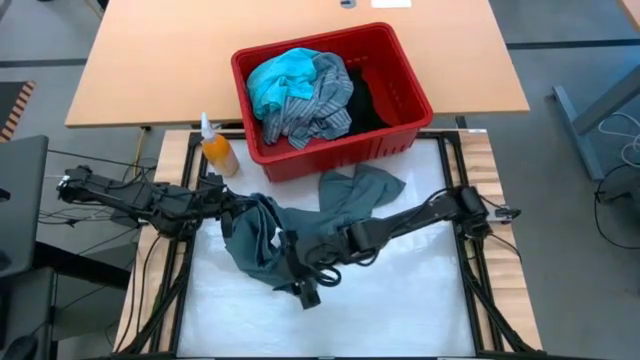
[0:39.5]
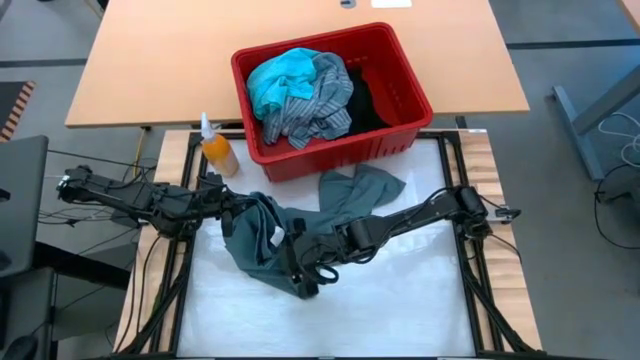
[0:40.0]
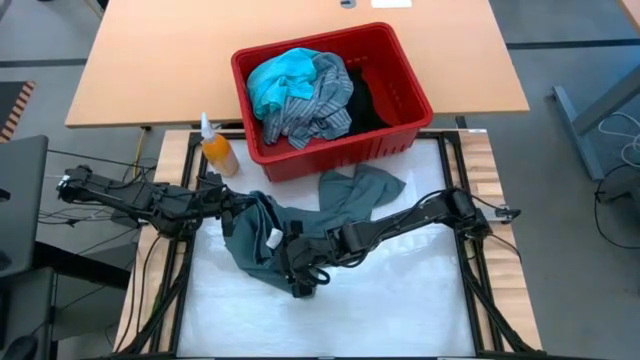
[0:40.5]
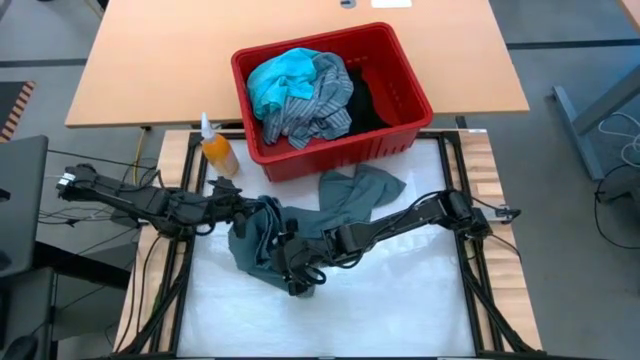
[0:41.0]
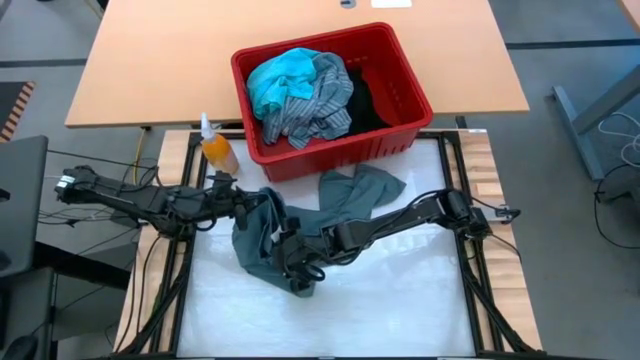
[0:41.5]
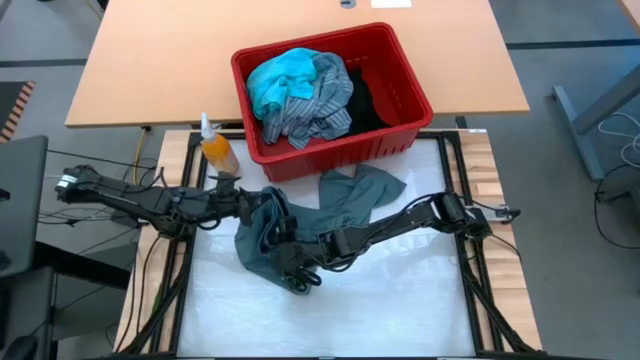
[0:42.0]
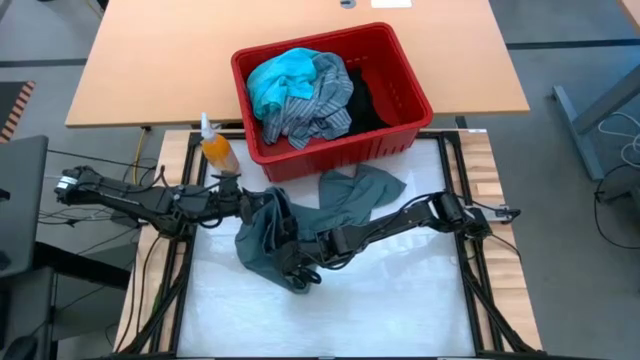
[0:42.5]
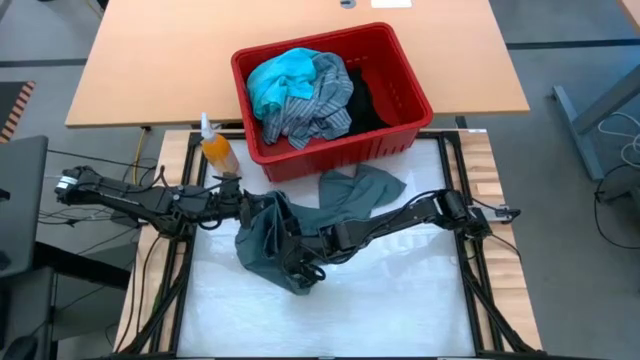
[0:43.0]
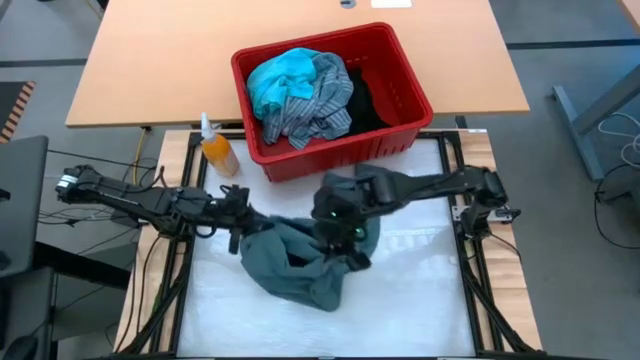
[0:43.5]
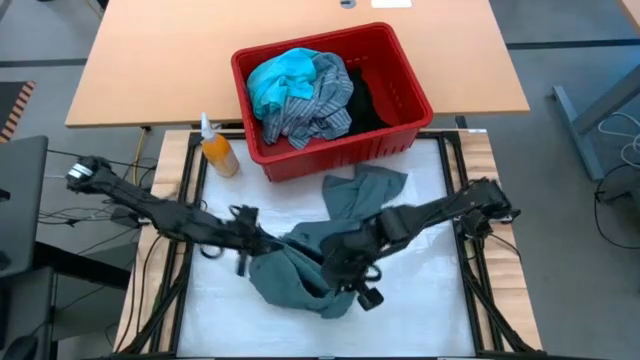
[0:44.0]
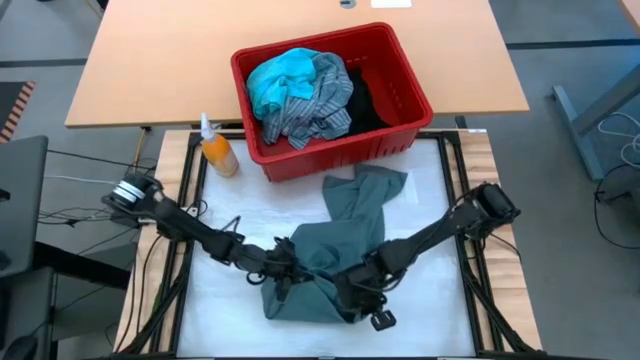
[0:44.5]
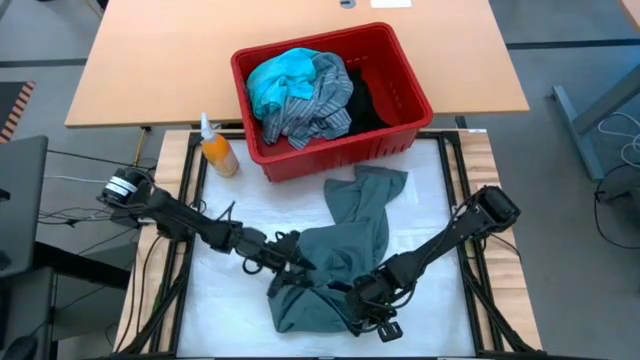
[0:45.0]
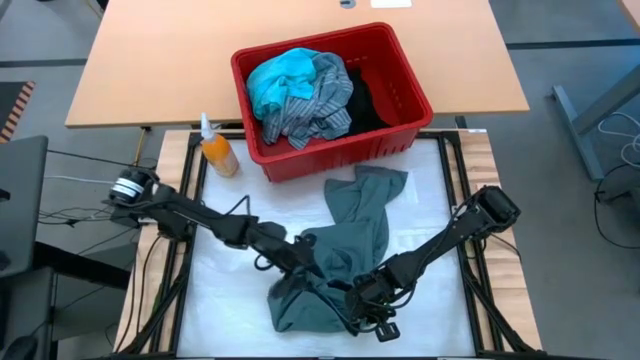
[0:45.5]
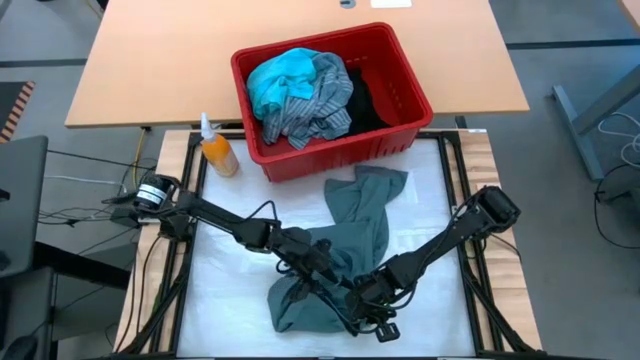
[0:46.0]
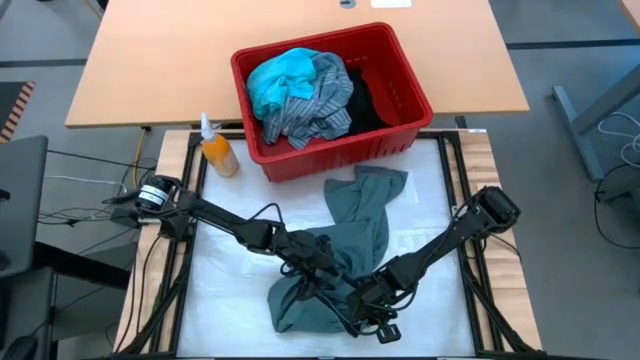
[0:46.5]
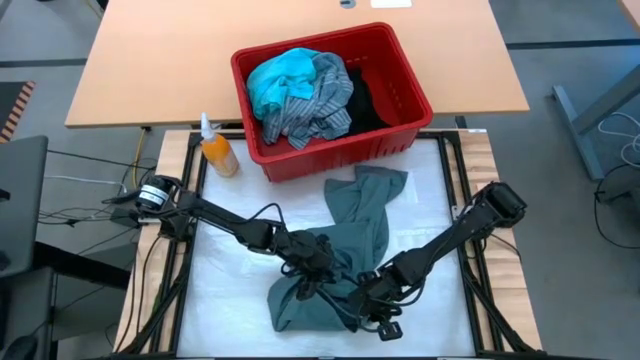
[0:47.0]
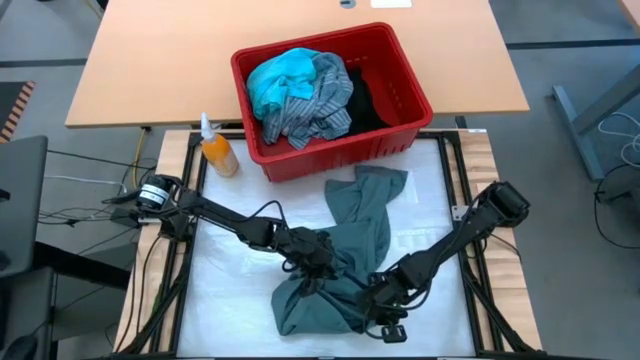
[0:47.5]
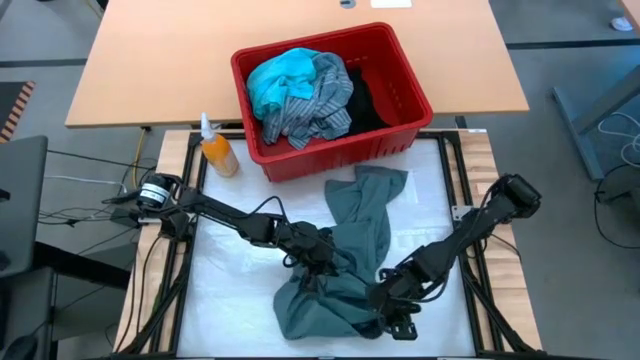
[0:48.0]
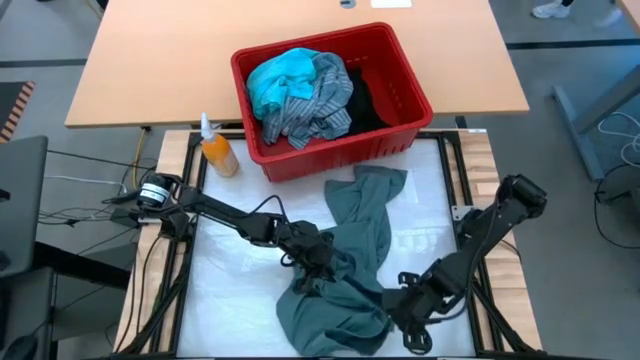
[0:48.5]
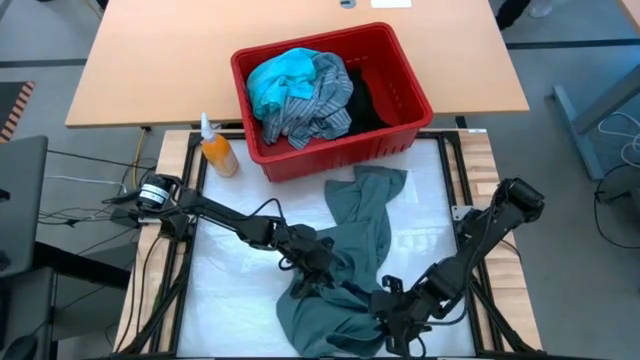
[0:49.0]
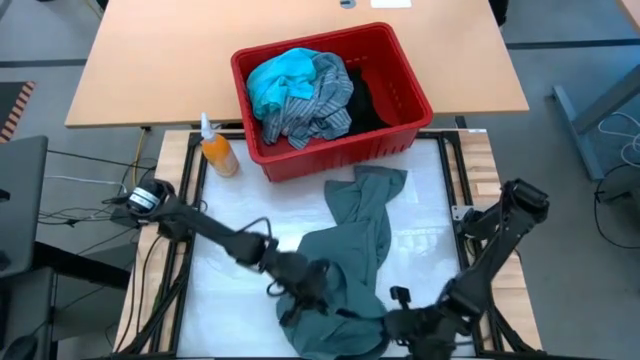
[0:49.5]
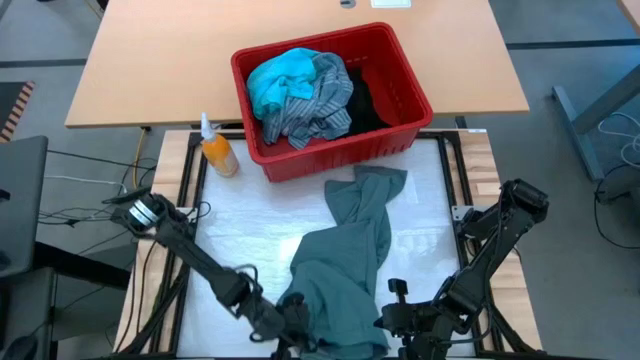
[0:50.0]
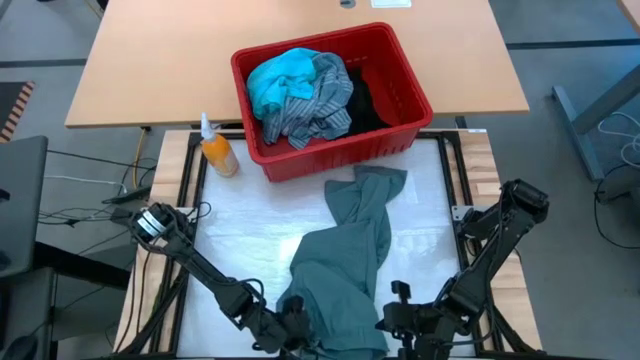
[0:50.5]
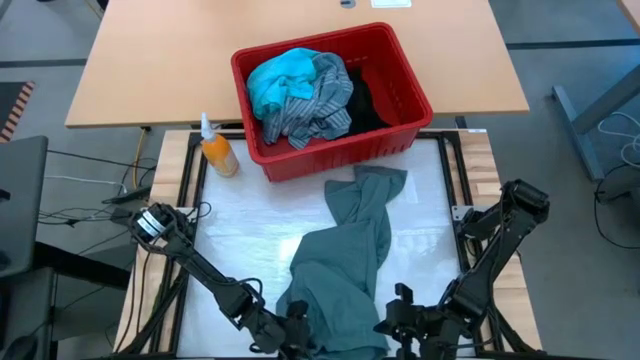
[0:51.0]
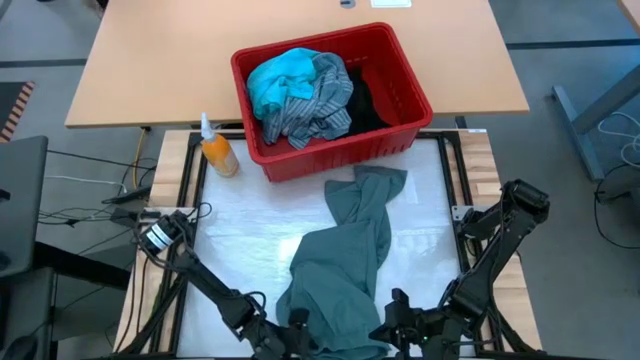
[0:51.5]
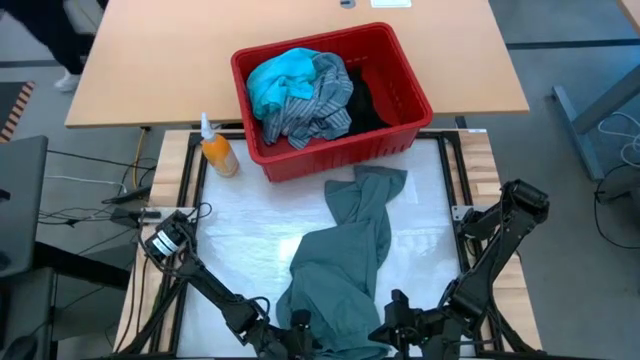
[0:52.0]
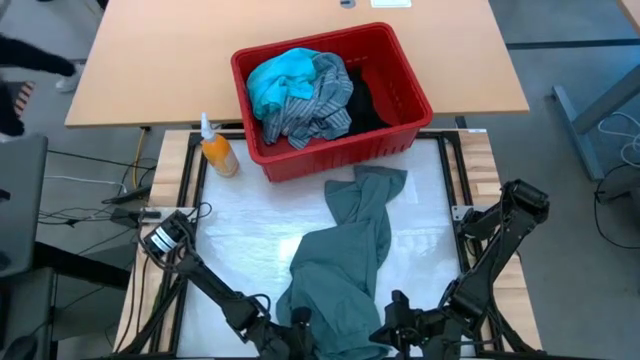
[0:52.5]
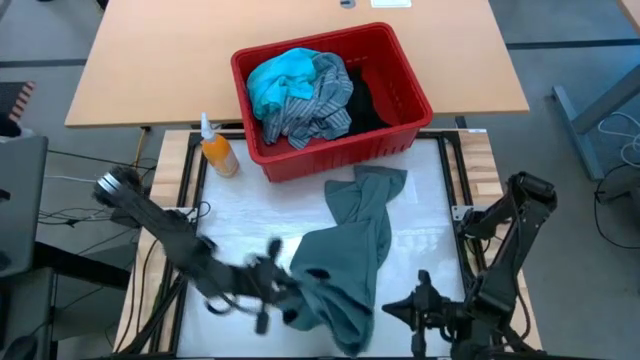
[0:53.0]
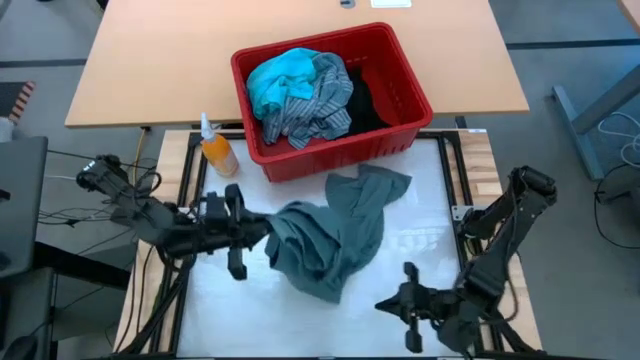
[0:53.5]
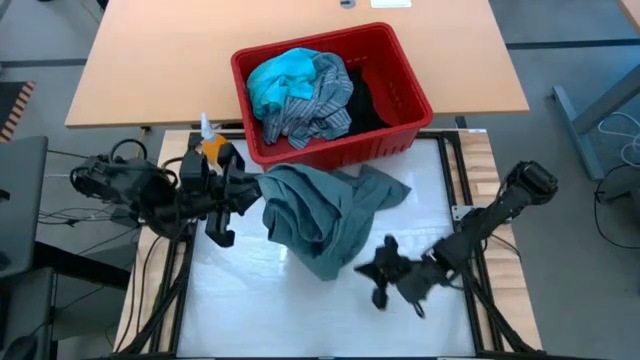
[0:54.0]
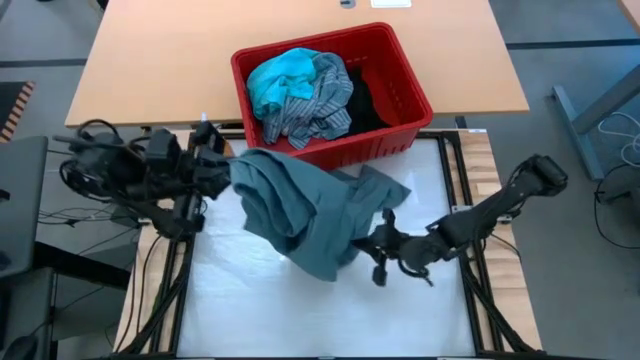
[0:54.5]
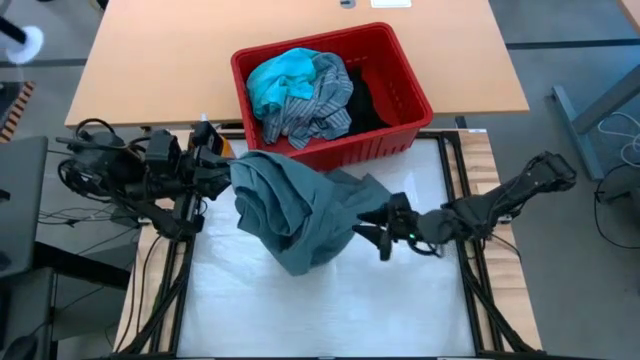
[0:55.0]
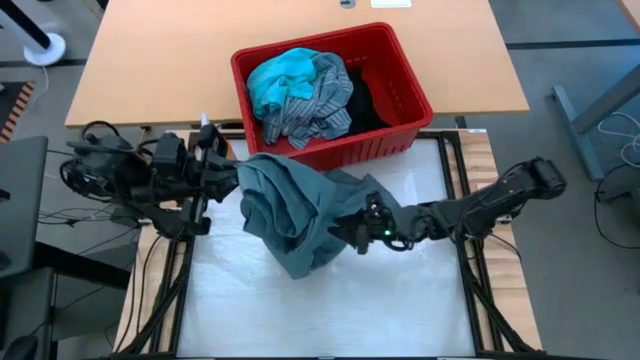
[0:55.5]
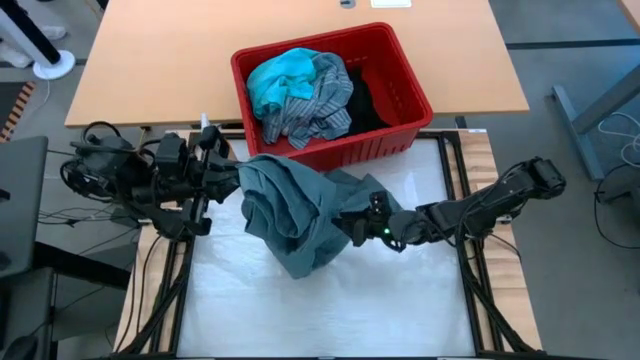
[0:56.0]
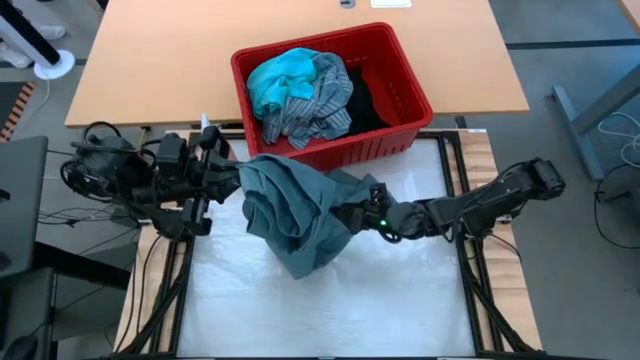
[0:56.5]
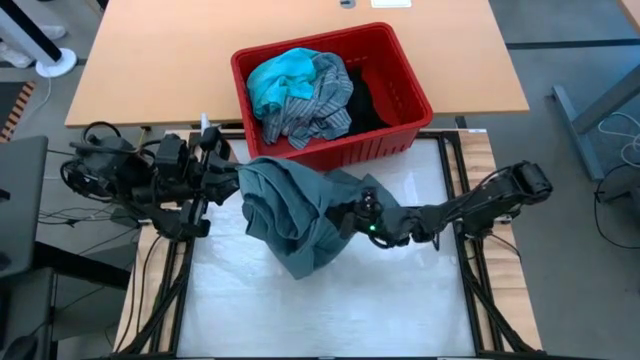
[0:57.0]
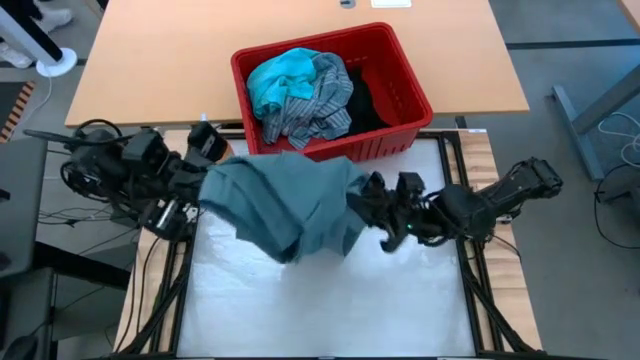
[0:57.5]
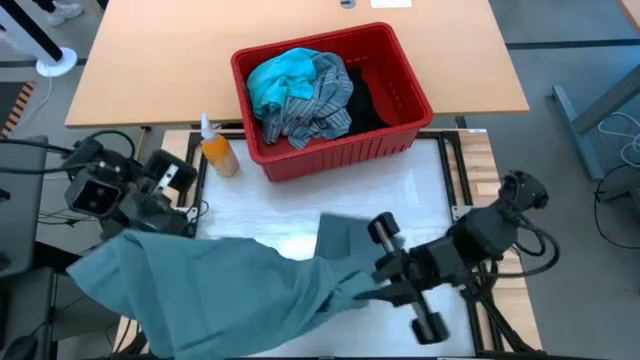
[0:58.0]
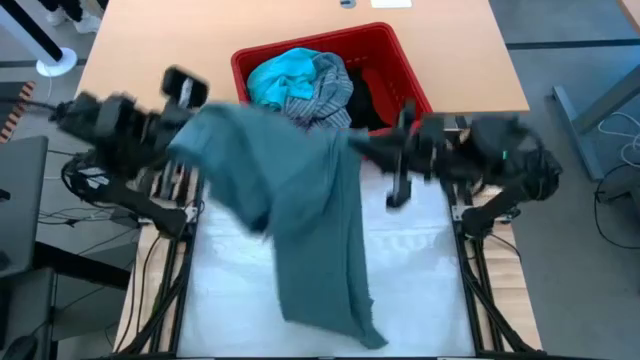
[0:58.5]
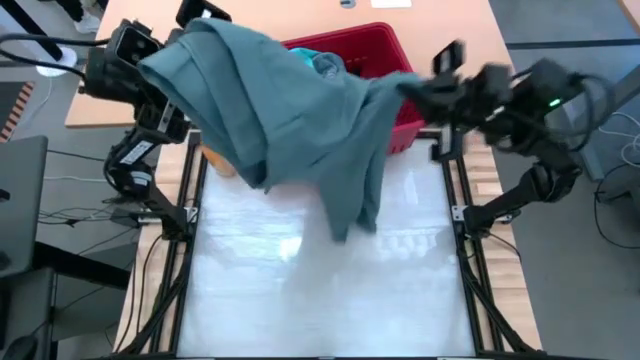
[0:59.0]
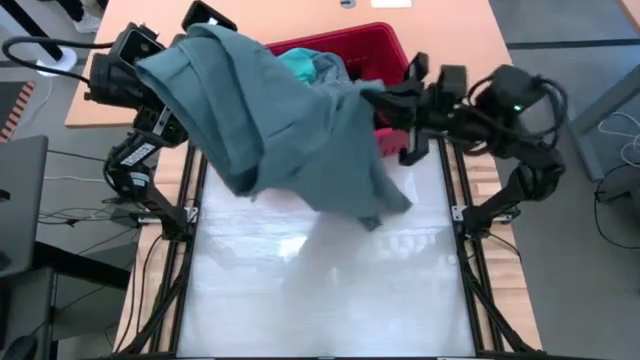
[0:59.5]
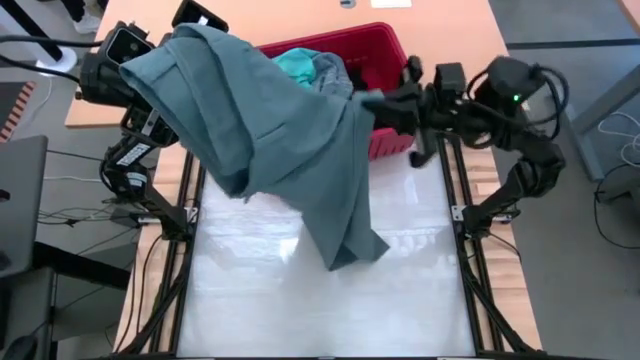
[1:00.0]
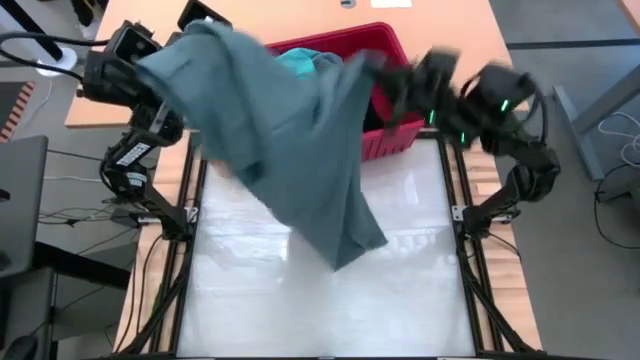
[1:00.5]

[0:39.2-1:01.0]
Task: Fold Laundry from Bin
Fold the dark blue pants
